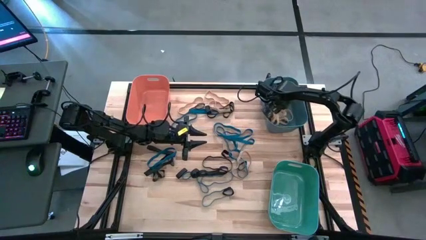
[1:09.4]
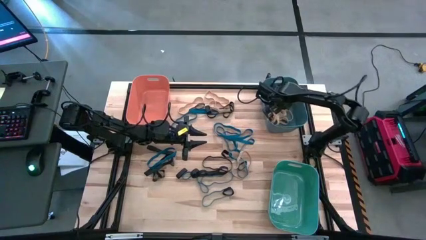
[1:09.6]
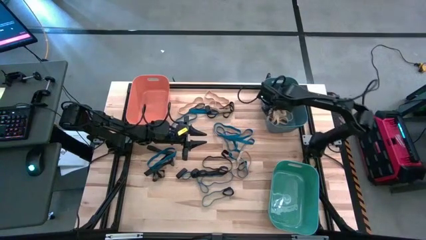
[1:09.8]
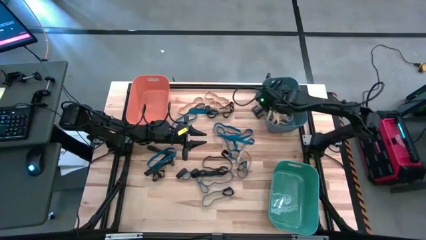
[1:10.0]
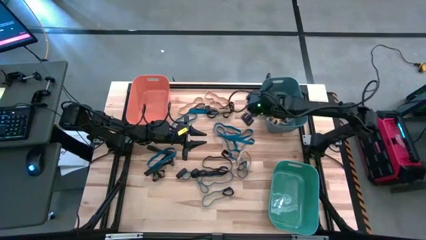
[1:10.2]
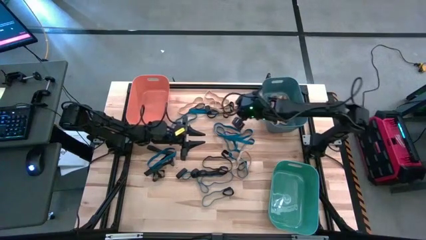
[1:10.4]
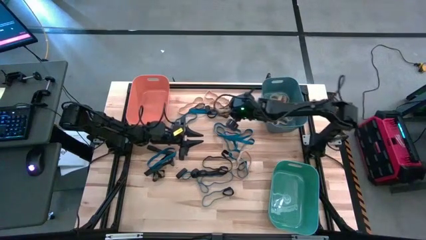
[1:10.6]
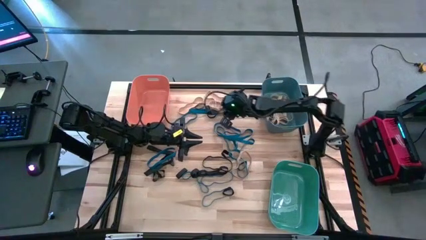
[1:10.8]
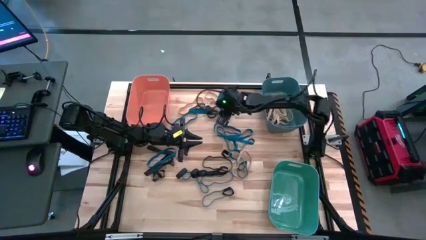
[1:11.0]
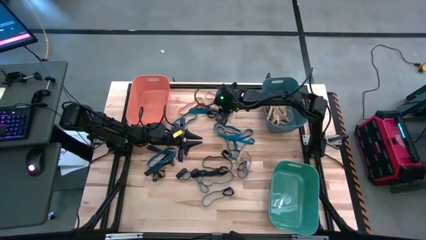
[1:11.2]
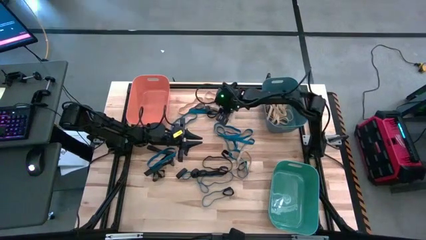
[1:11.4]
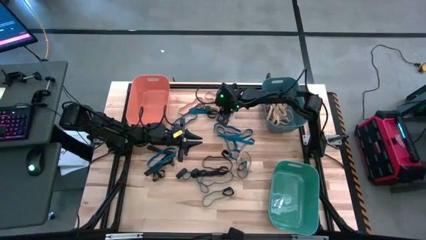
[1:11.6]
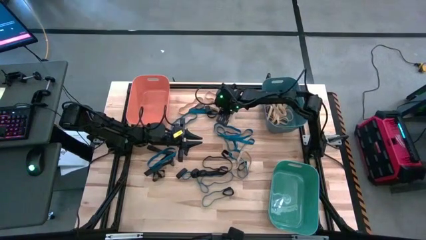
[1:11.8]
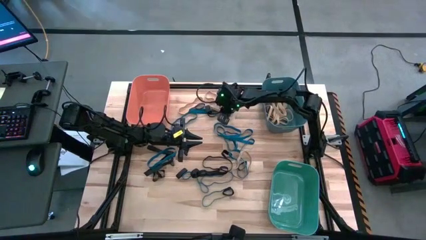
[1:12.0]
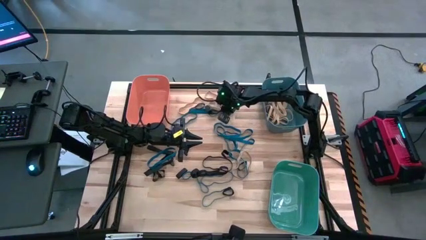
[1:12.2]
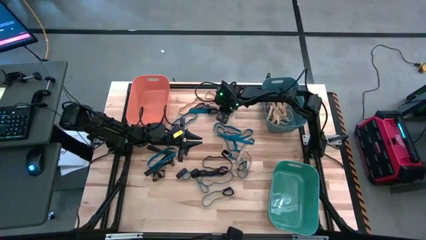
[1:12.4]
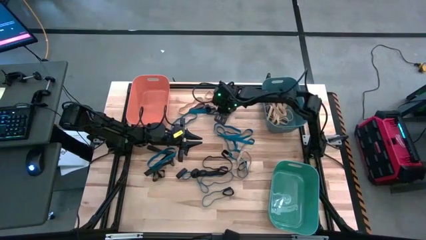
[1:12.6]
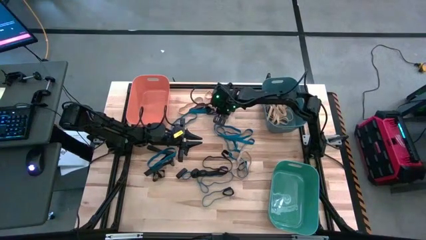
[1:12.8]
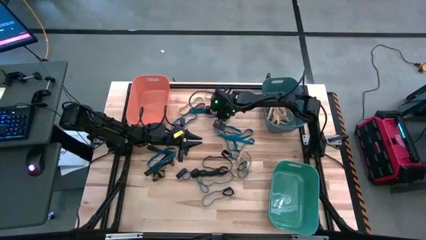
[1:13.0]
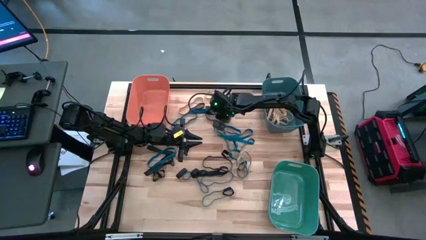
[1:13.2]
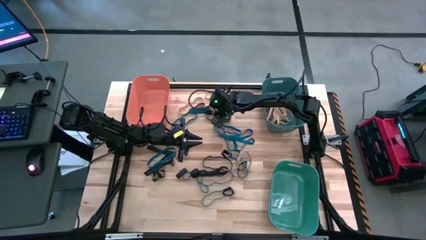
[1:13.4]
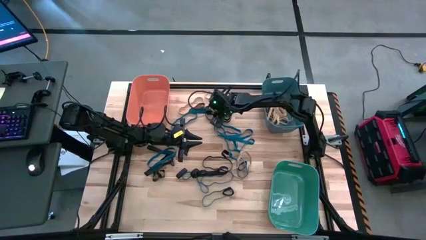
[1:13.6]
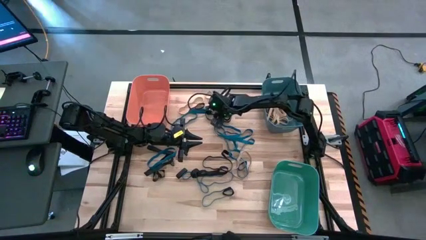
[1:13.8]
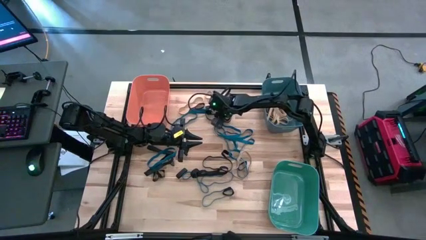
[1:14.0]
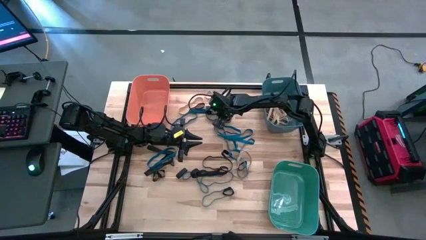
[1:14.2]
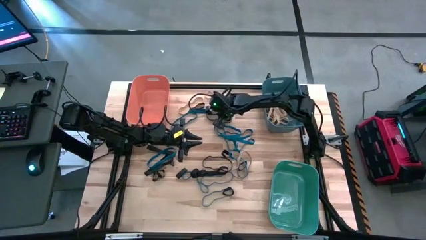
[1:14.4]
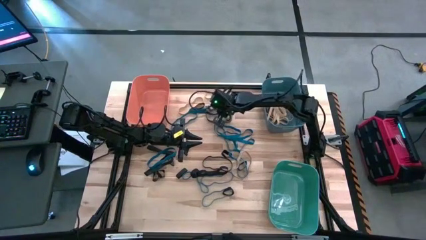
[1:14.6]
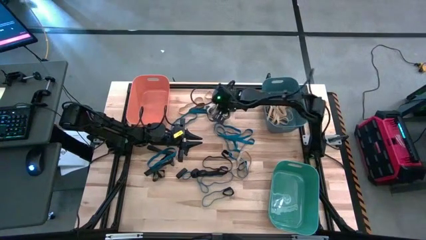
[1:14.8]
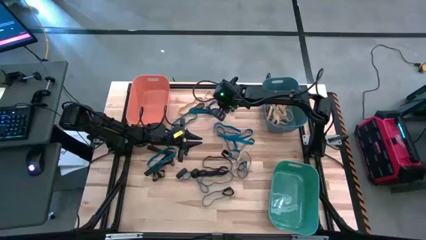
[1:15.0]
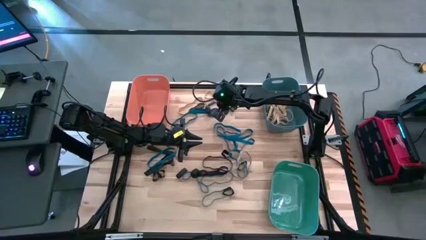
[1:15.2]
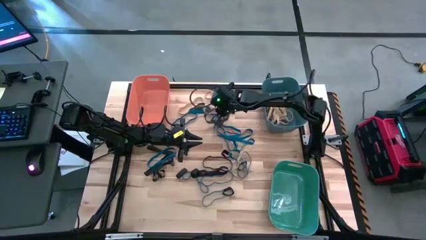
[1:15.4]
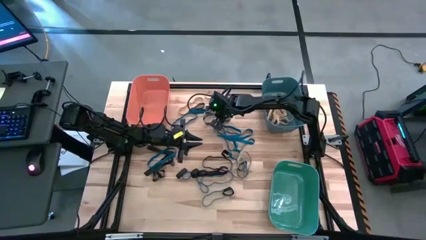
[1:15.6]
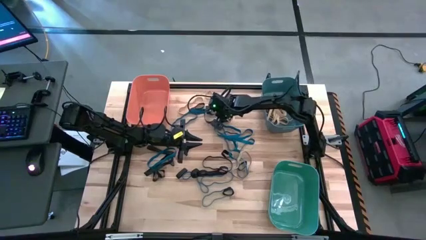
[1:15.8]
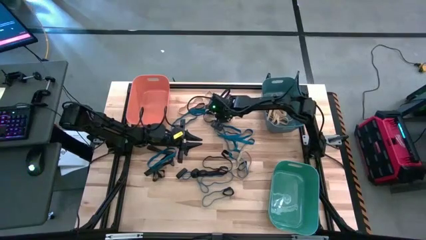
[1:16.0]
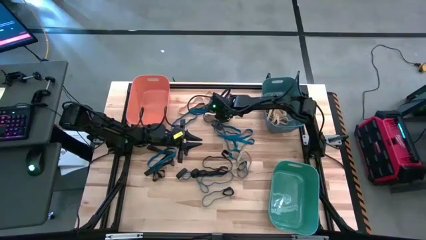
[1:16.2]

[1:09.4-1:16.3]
Task: Sort rubber bands into baskets
Put the white rubber band into the blue bin

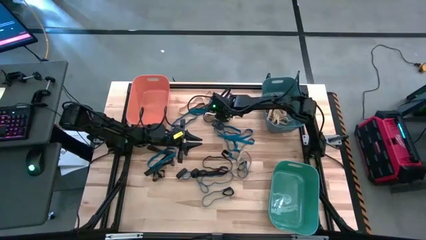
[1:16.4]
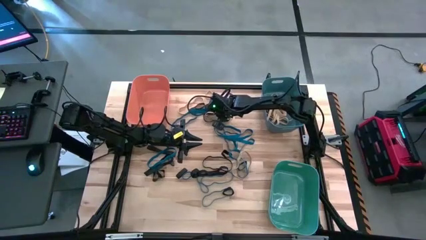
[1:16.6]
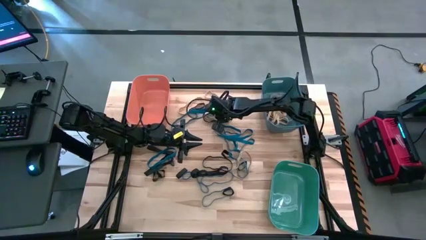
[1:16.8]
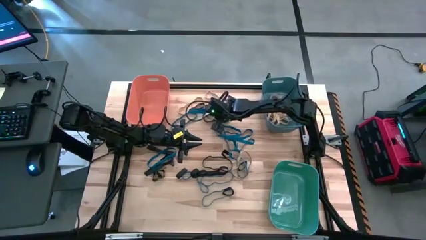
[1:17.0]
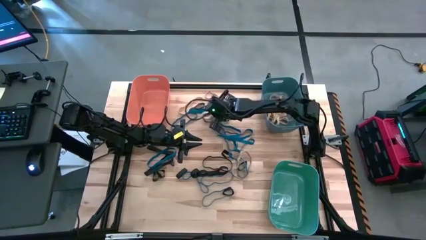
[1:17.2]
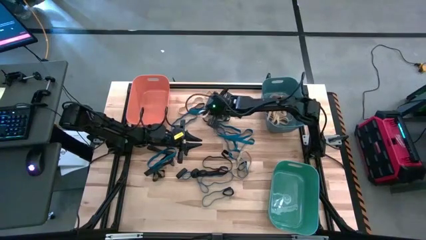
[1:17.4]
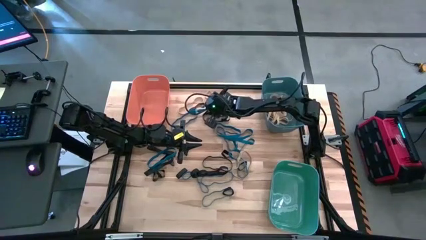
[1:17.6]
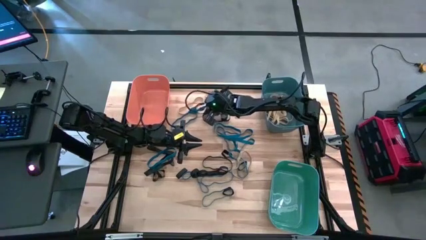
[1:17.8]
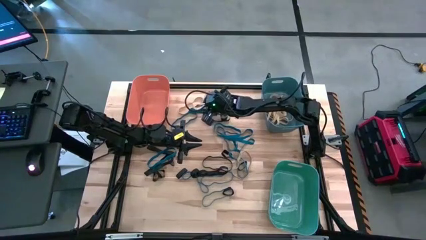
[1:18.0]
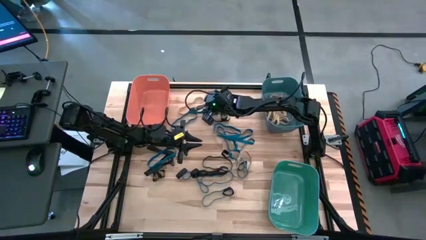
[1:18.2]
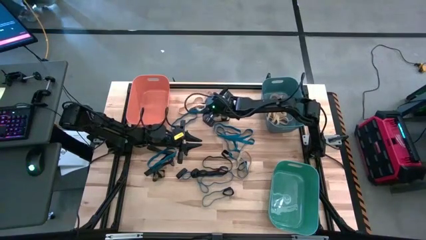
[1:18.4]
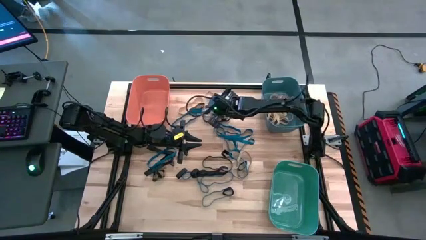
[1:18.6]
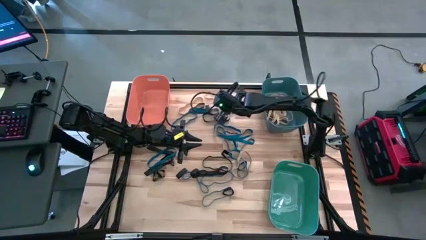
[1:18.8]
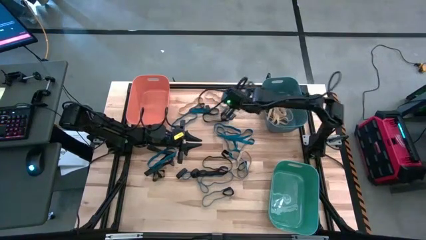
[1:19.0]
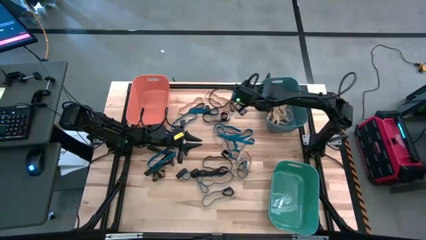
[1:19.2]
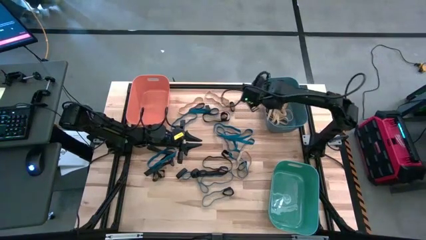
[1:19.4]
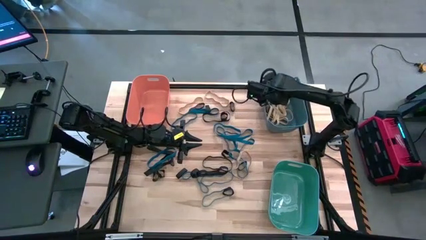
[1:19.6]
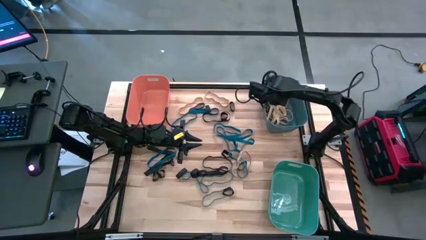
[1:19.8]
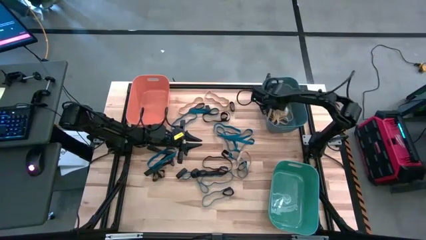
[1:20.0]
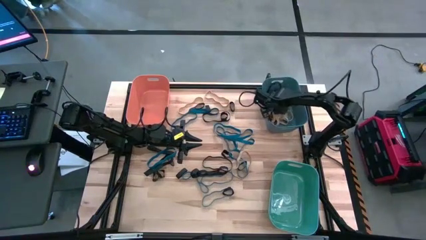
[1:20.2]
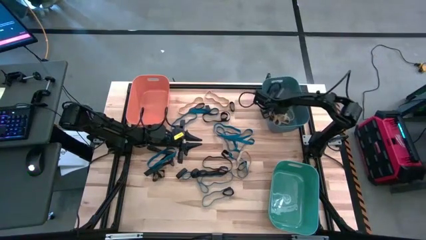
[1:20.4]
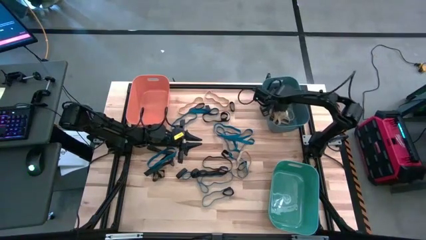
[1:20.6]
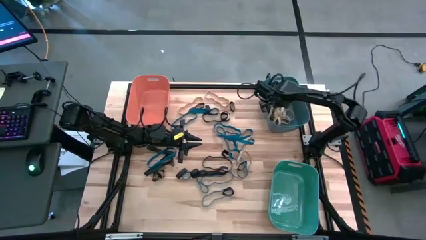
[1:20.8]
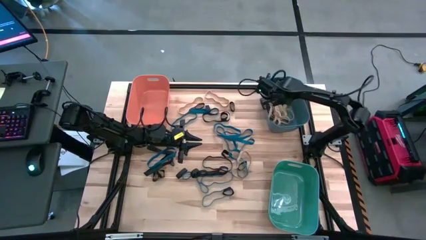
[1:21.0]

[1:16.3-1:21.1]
Put the white rubber band into the blue bin

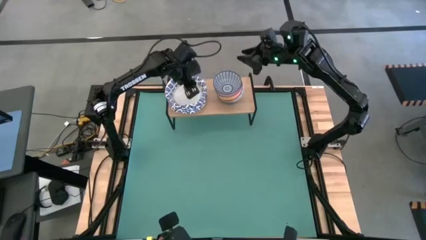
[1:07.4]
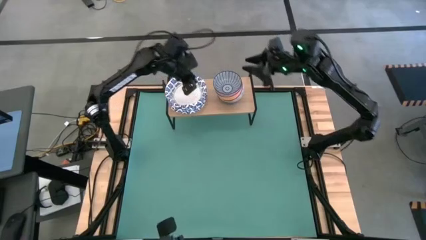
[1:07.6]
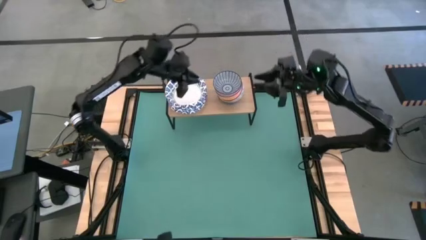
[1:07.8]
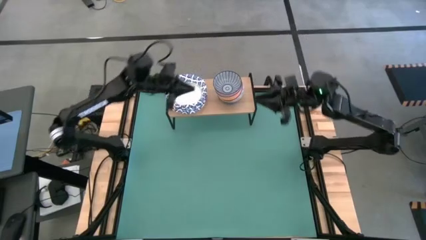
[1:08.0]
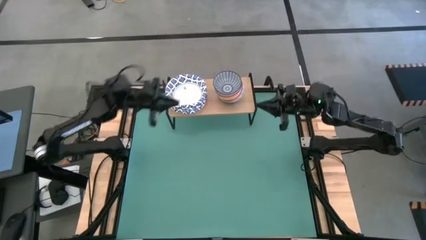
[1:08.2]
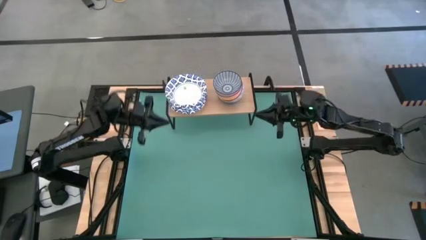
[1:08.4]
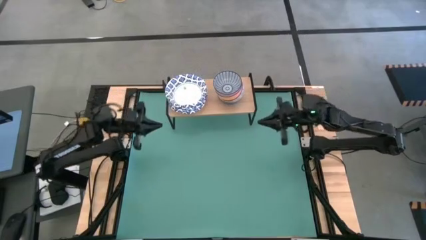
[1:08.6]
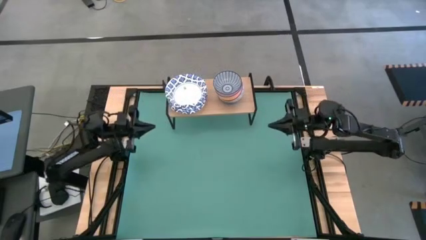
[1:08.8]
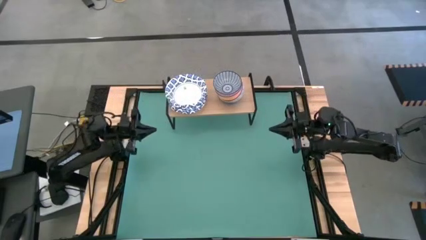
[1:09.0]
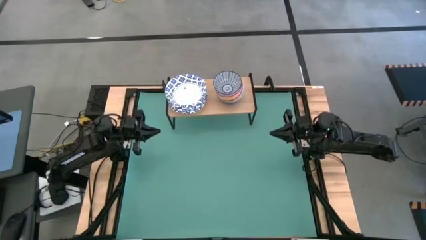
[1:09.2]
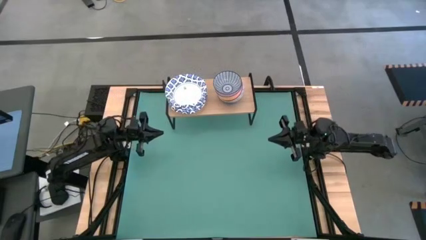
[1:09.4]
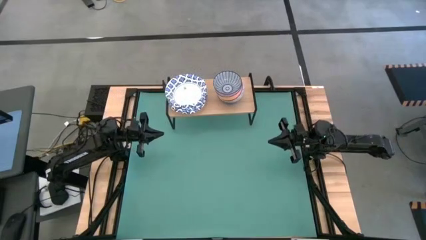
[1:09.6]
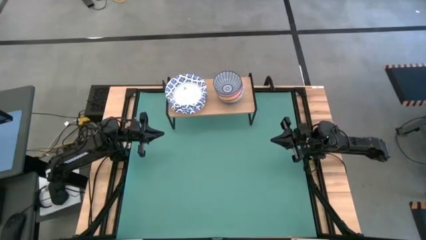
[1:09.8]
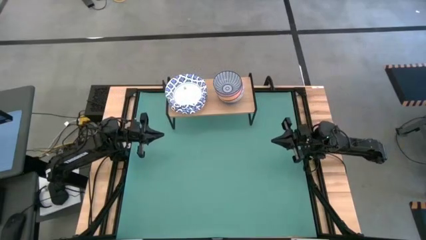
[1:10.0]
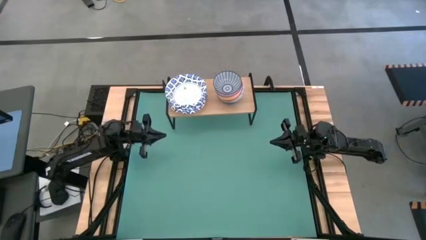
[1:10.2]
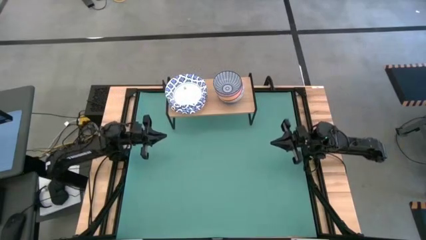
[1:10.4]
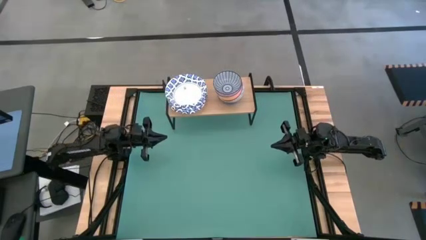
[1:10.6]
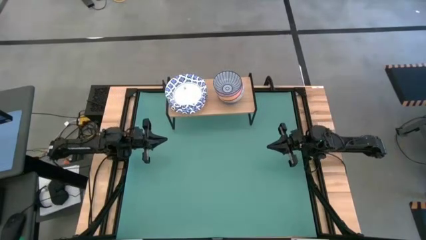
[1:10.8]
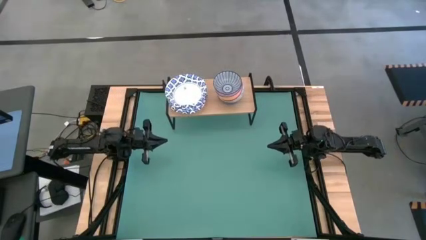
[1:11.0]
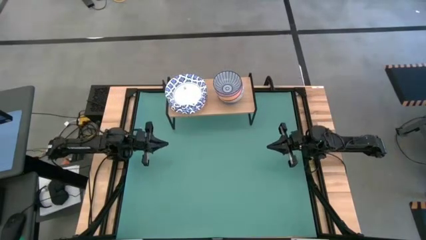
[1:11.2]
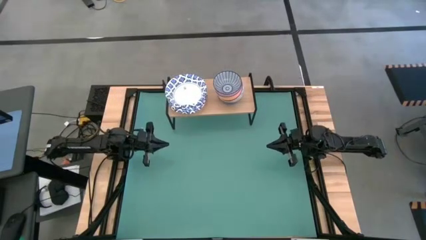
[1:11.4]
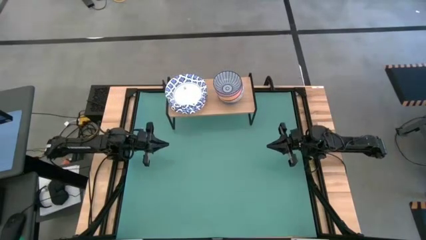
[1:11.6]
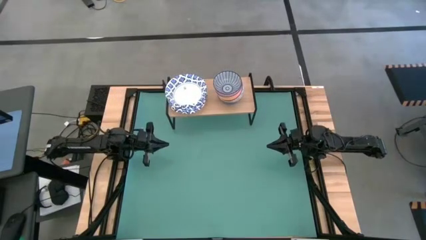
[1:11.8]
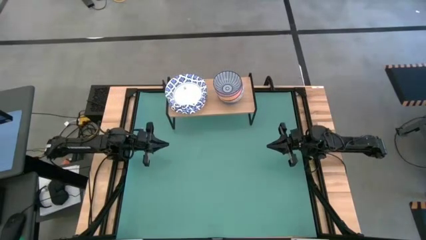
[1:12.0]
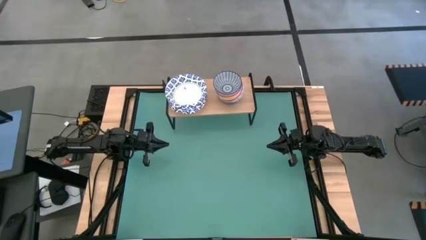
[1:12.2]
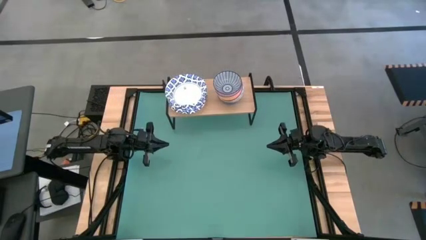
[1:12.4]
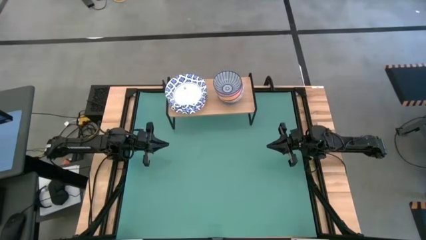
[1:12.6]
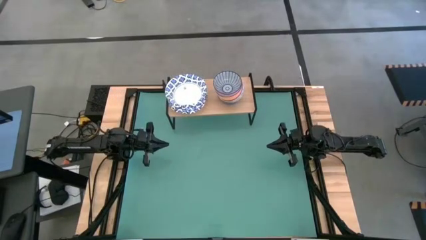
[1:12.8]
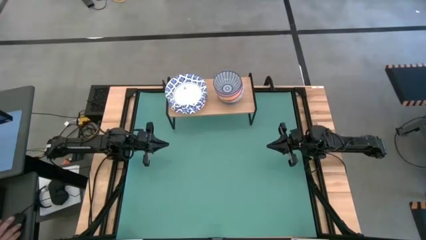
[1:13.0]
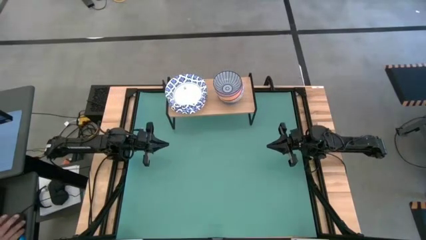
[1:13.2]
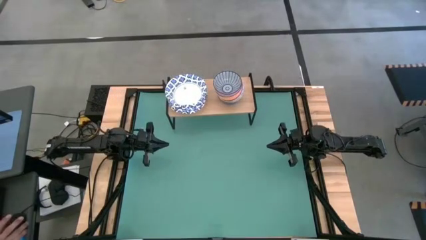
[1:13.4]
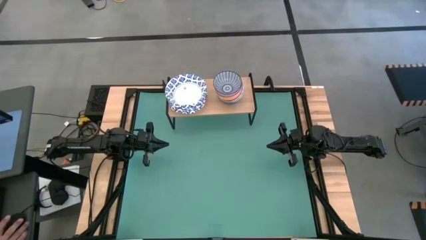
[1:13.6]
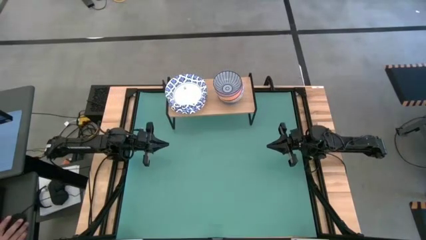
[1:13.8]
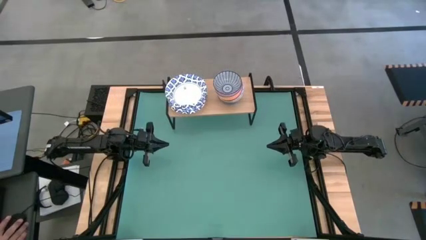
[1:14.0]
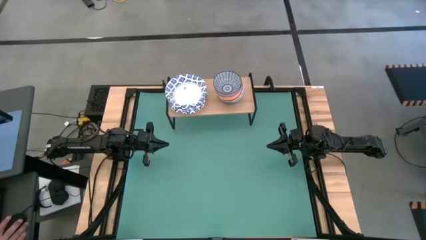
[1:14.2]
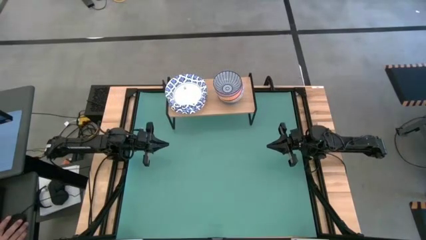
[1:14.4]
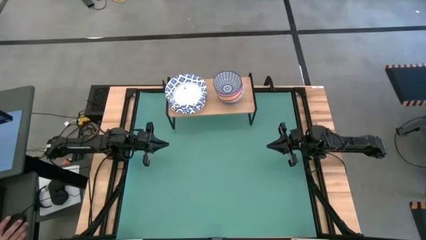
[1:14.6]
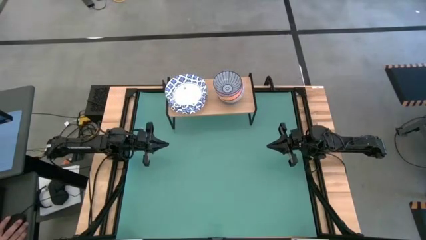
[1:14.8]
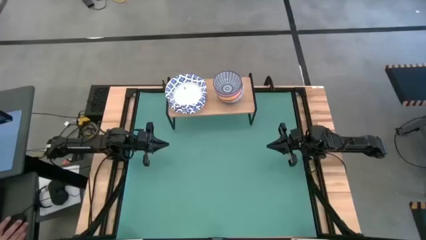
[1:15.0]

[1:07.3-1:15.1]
Task: Place and stack bowls onto a shelf
Return to Home Position
